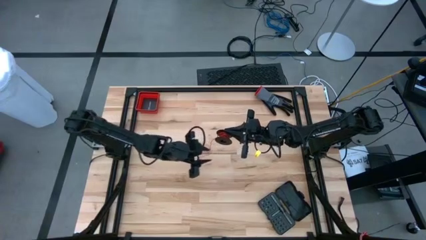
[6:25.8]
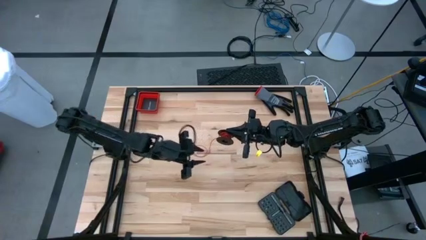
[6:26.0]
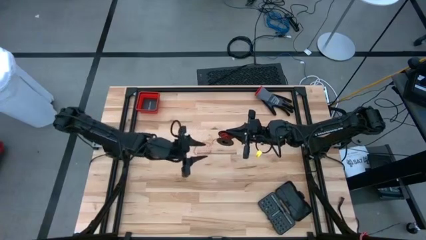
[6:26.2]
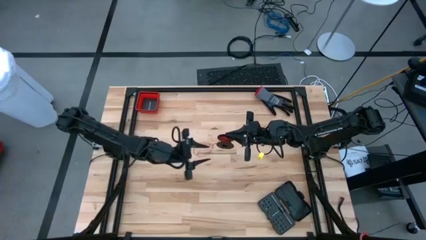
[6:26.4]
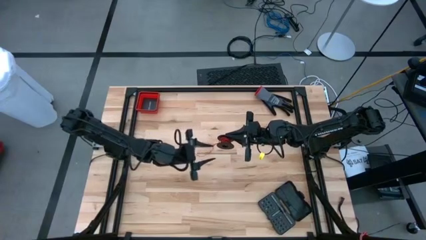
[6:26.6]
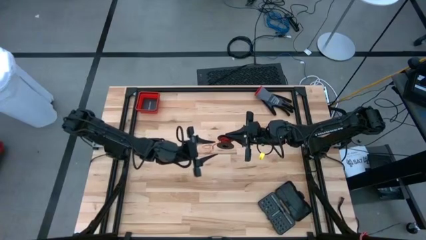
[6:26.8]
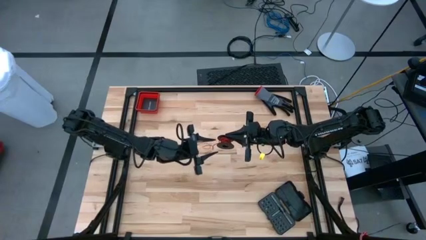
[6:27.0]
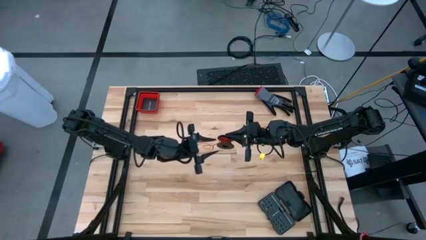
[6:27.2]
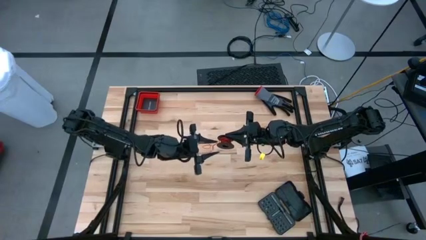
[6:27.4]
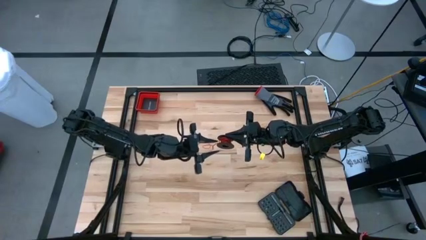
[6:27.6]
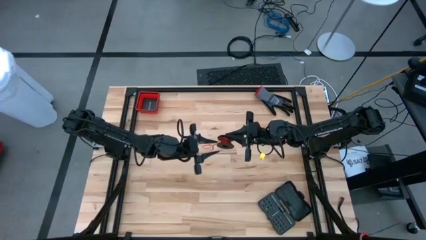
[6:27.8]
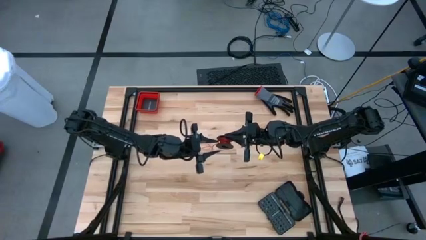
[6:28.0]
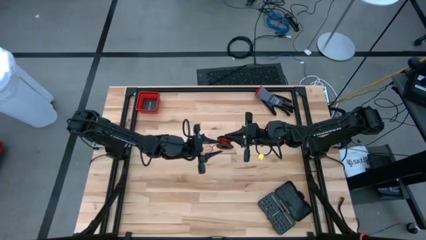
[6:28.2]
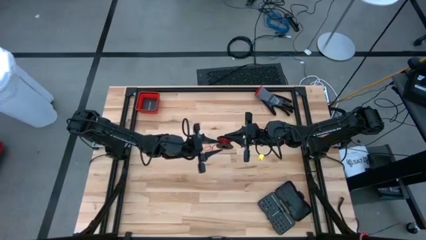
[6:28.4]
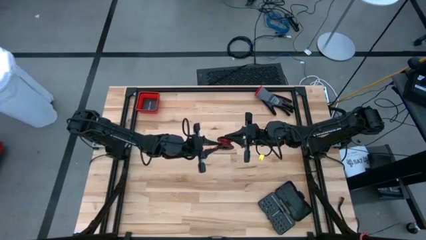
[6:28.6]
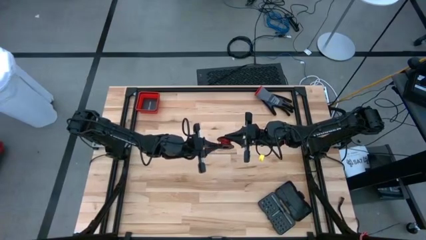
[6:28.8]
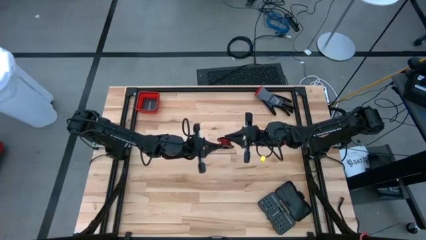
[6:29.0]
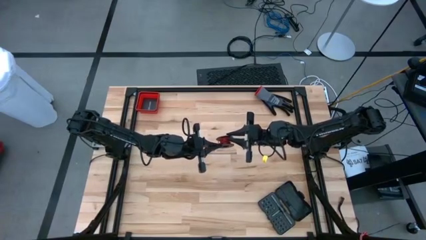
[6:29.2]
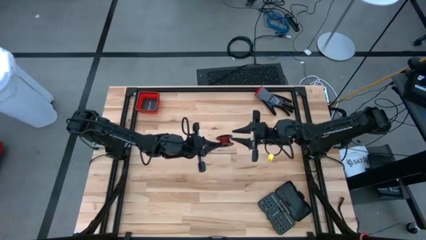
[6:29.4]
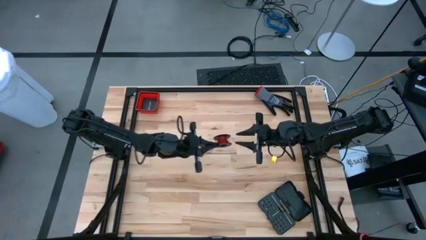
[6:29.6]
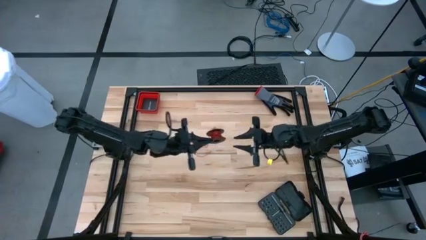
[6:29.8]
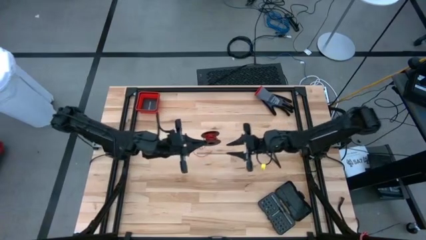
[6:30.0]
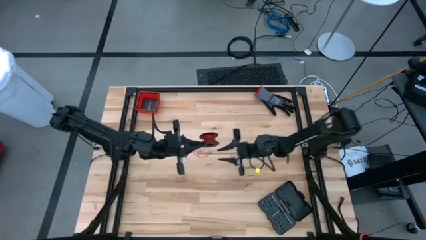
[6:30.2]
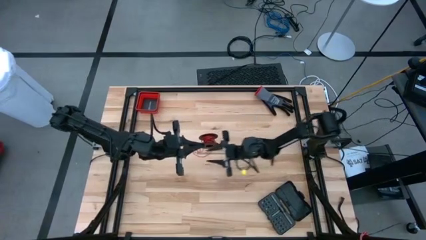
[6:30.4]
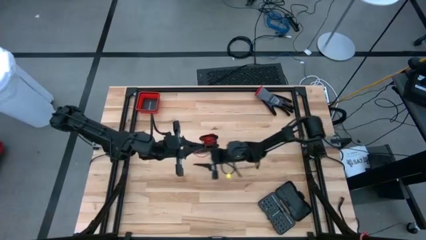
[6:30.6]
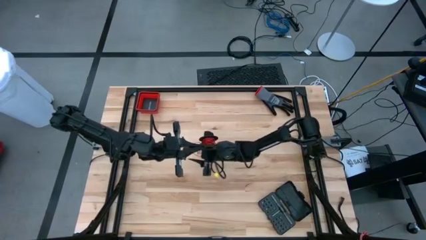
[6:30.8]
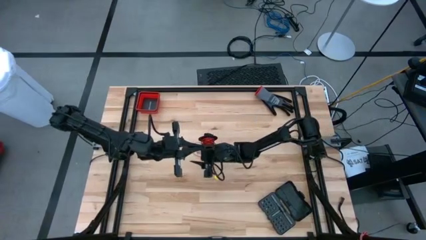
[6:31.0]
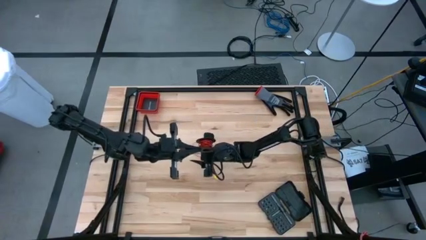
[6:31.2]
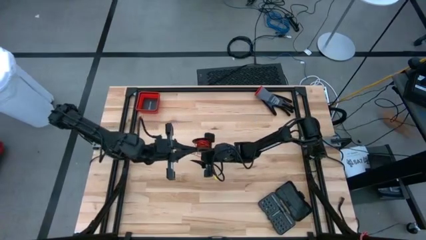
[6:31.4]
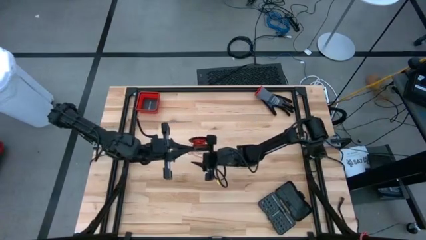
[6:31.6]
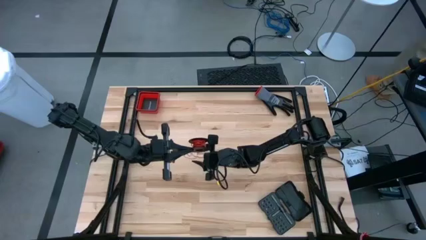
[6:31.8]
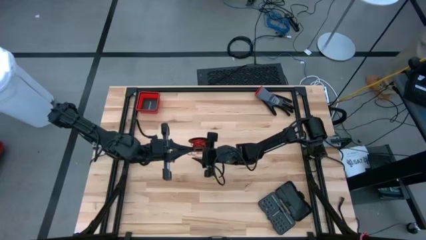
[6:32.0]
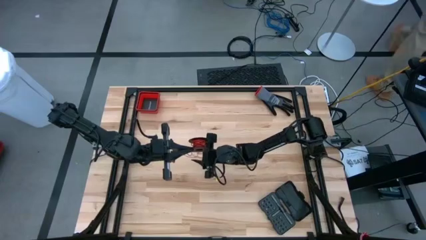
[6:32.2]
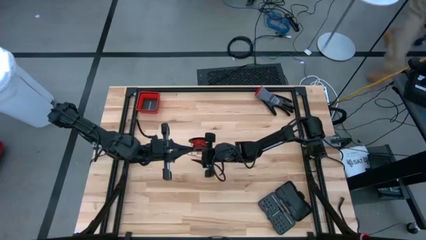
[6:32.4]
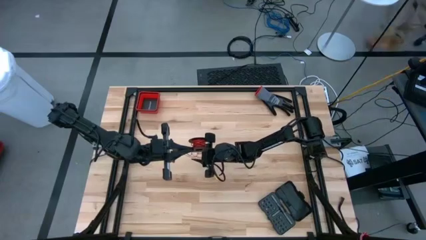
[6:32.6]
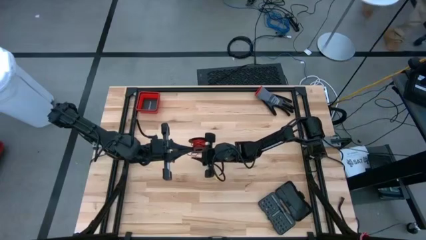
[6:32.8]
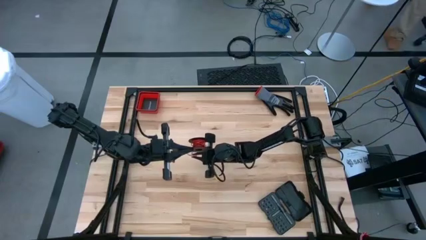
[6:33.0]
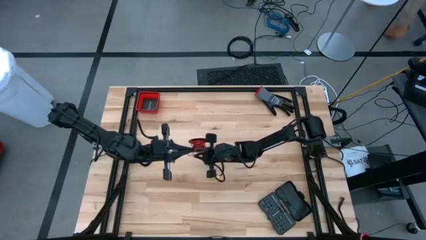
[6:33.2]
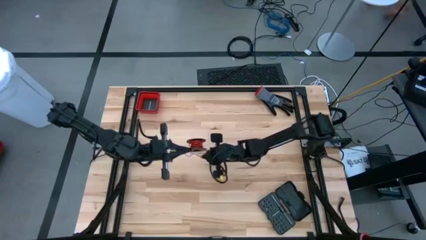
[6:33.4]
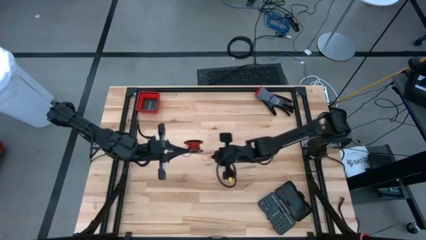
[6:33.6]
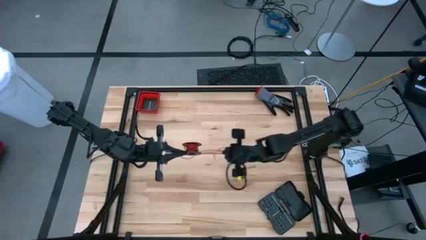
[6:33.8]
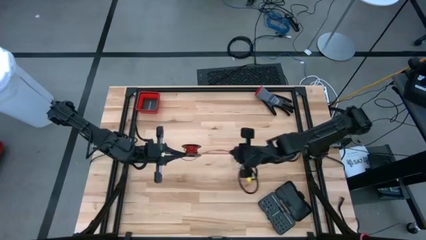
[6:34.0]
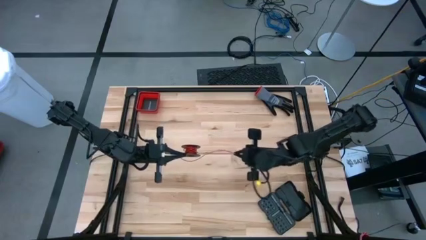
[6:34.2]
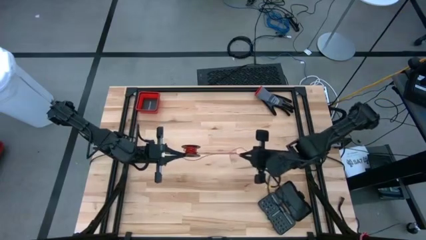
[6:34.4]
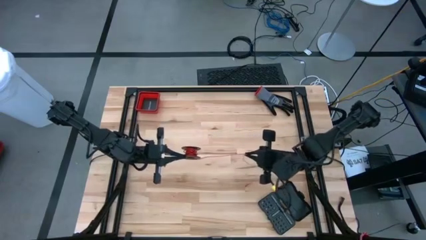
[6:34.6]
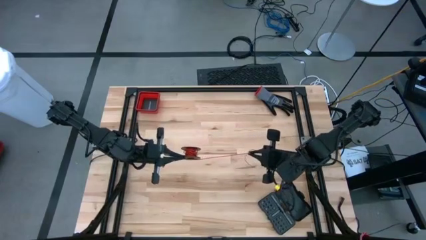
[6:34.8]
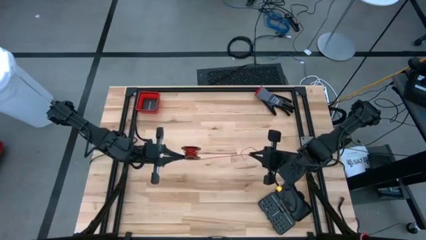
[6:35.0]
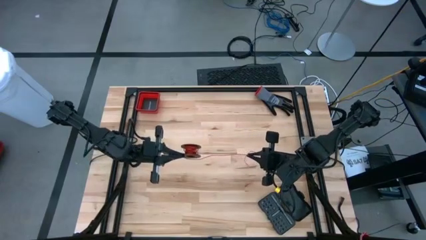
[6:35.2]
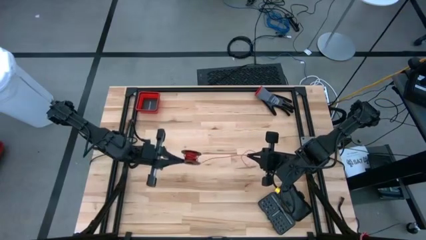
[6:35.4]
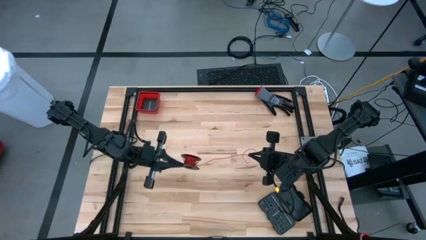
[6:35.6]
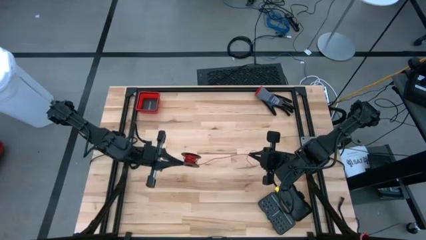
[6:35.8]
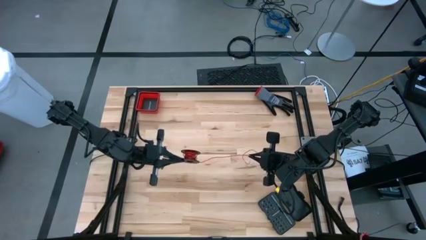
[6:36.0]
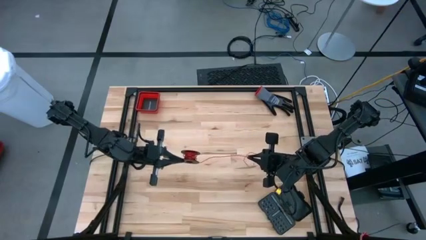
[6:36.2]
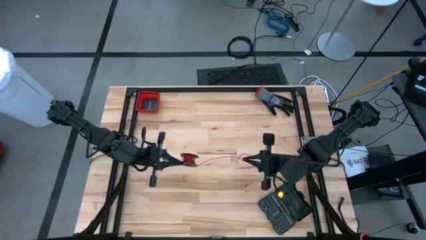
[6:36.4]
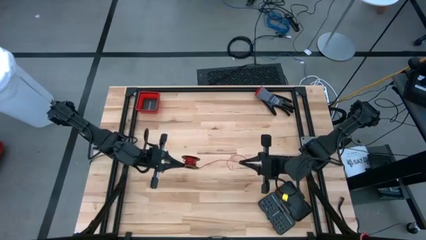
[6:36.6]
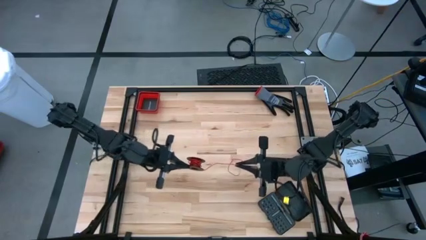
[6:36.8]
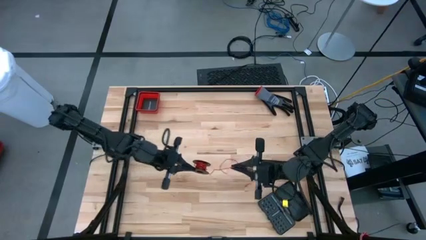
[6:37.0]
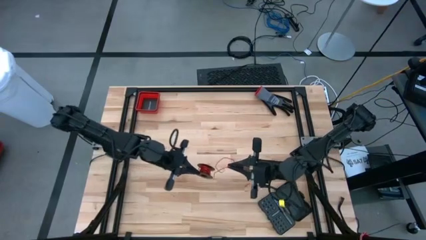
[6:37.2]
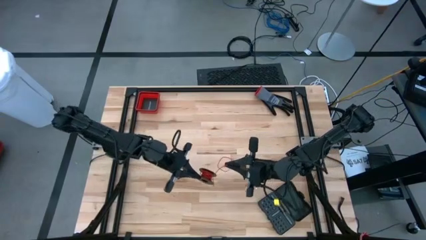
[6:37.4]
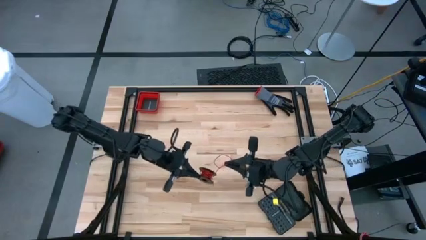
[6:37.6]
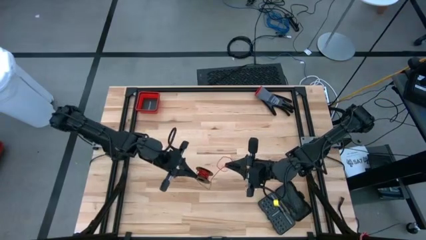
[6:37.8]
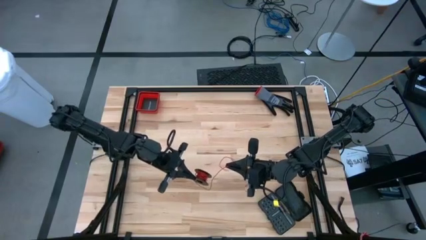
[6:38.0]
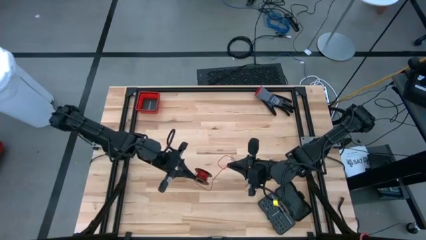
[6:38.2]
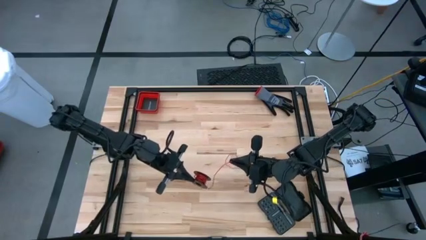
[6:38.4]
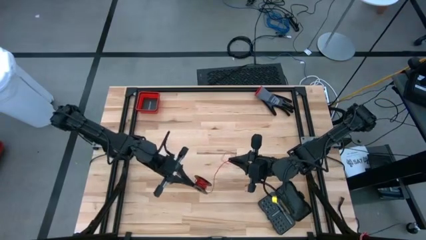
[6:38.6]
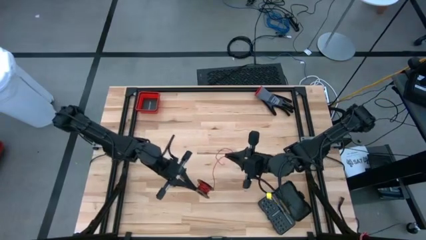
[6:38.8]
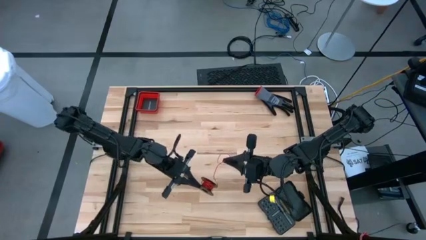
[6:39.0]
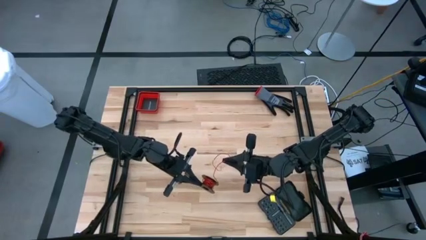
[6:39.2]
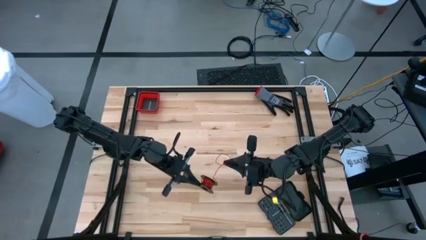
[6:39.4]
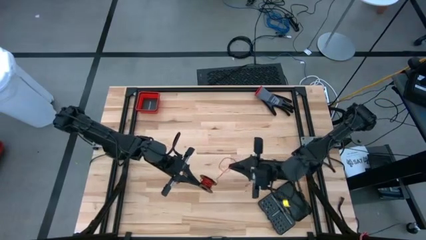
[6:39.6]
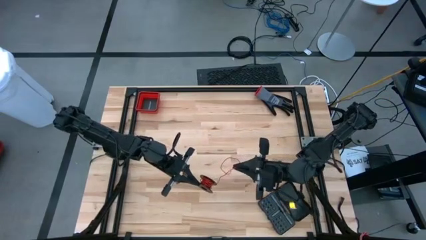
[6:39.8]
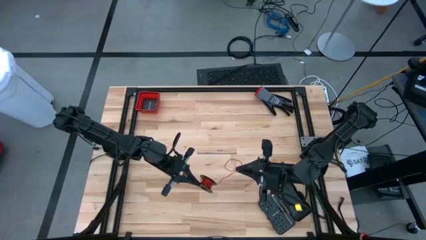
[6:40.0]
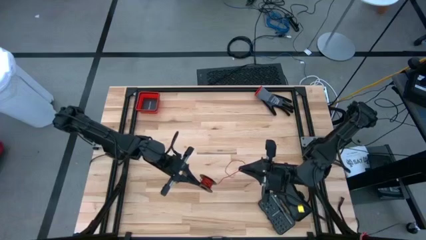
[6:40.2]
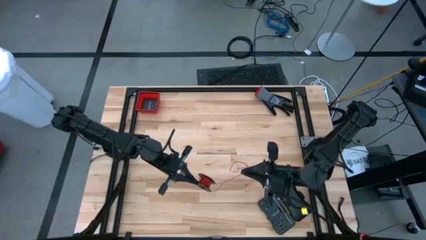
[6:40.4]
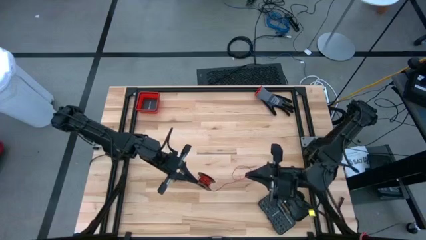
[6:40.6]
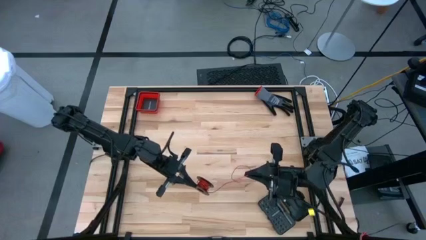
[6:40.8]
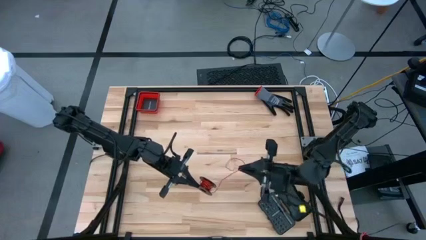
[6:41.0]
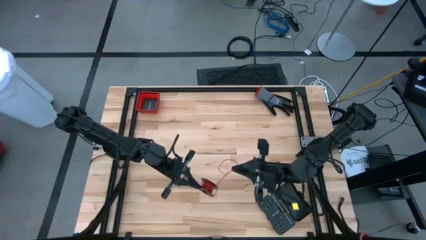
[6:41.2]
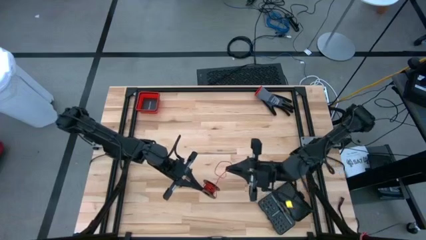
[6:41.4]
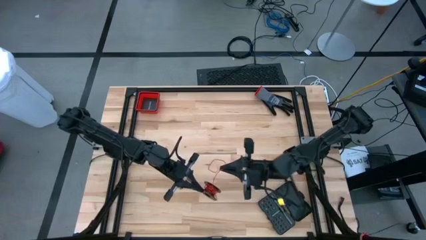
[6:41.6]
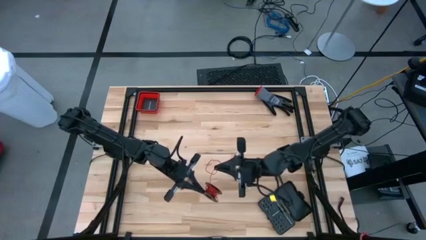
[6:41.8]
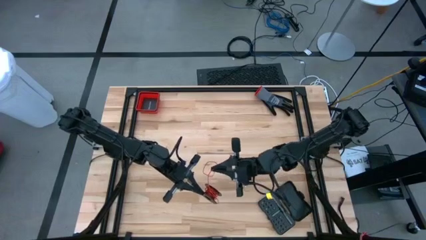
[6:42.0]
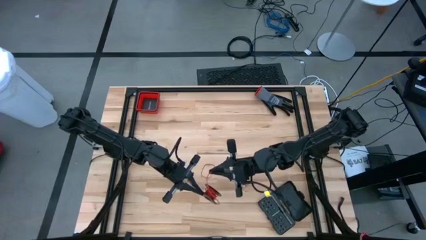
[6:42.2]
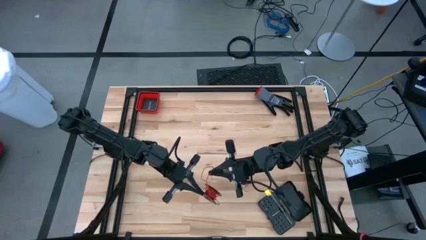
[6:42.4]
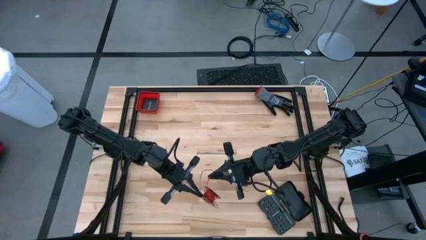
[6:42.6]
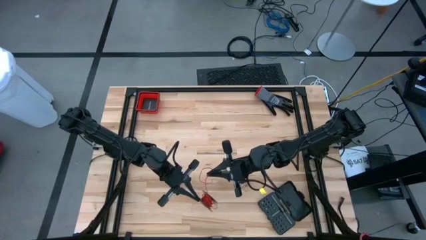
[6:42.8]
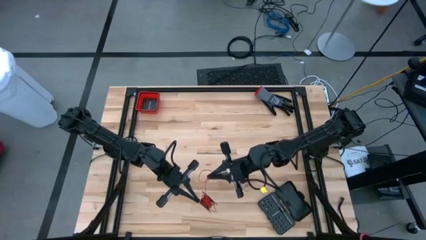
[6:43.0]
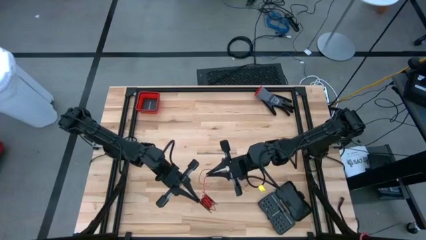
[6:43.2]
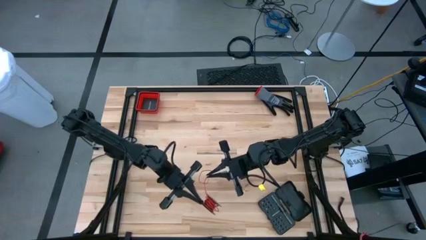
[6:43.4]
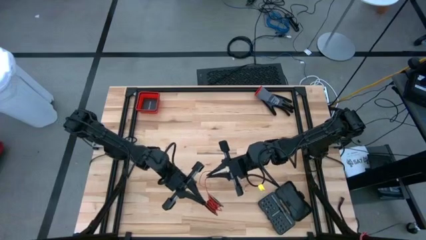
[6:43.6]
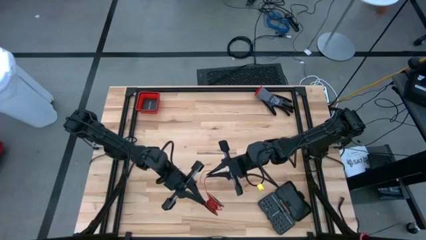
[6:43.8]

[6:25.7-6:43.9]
Task: Coil cords
Coil the red wire onto the spool
